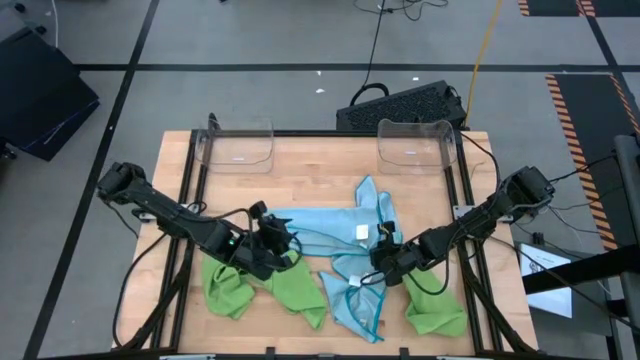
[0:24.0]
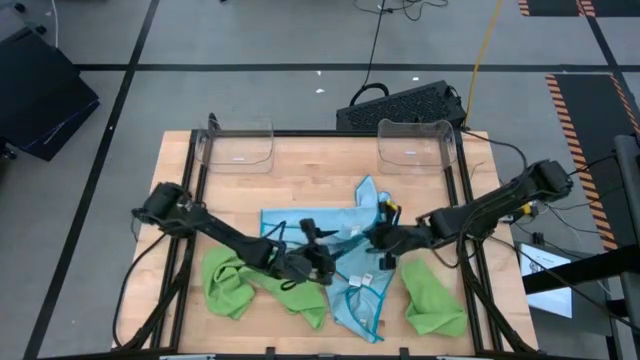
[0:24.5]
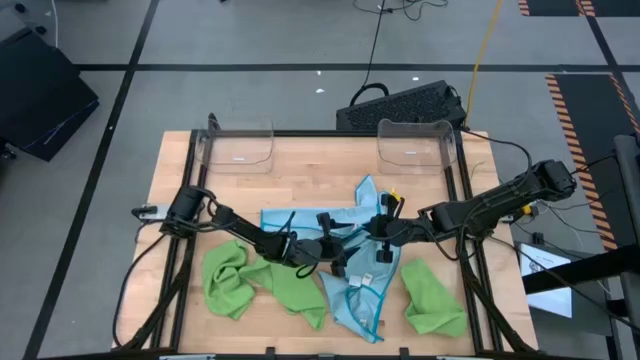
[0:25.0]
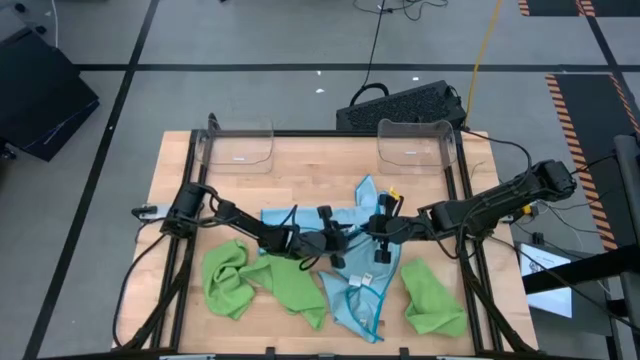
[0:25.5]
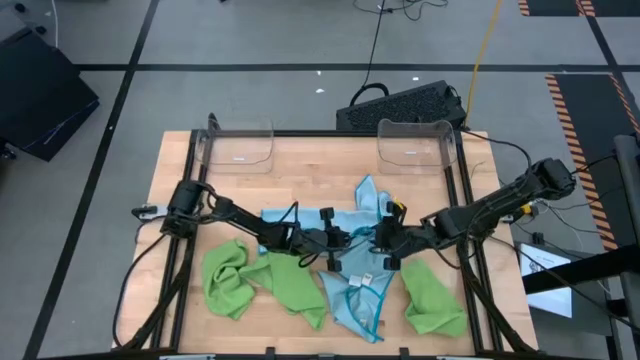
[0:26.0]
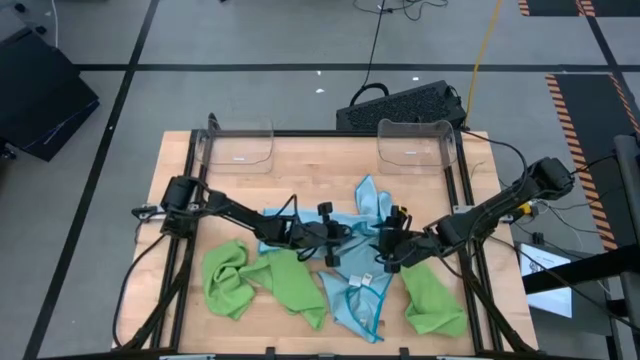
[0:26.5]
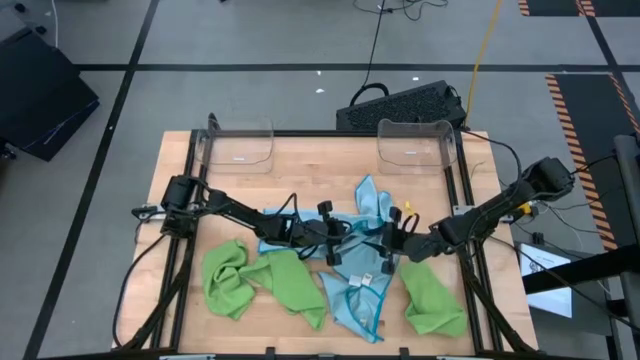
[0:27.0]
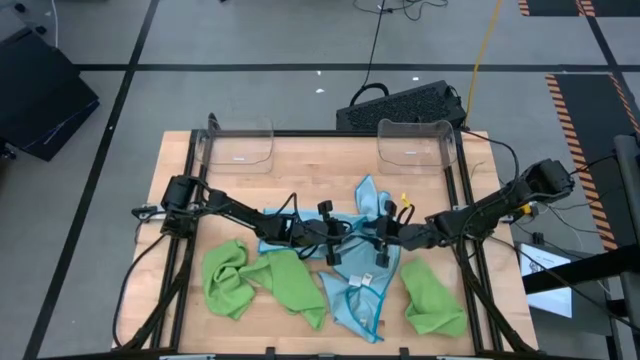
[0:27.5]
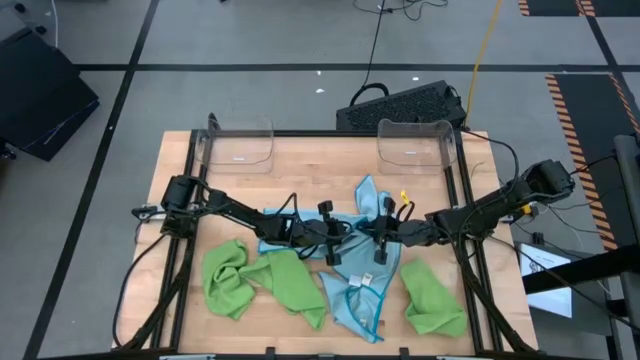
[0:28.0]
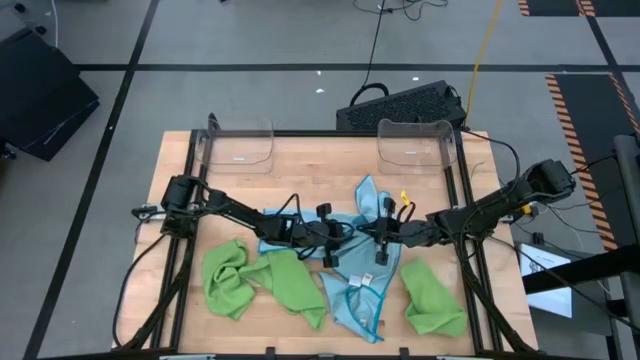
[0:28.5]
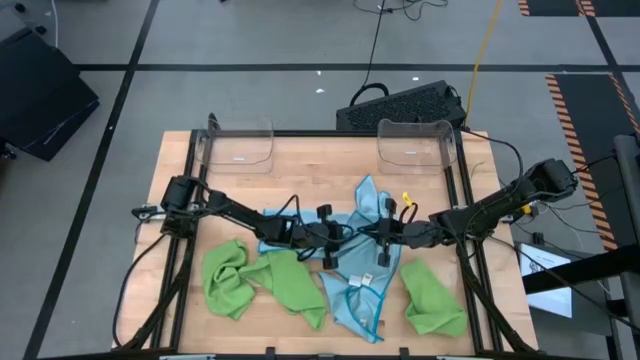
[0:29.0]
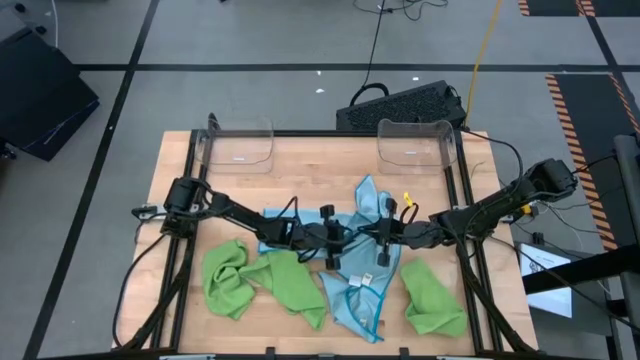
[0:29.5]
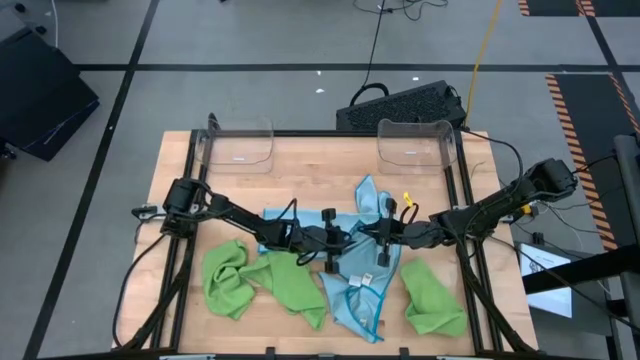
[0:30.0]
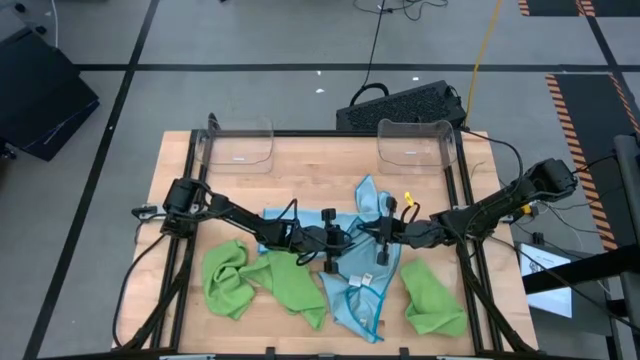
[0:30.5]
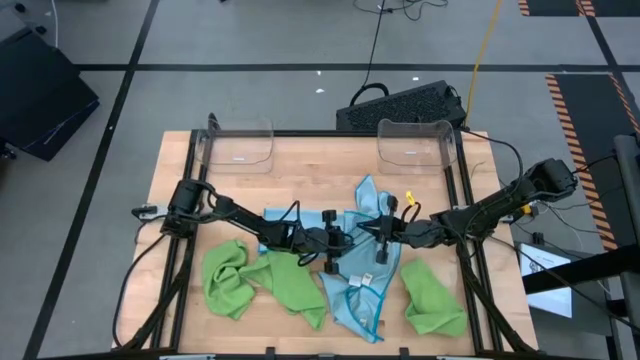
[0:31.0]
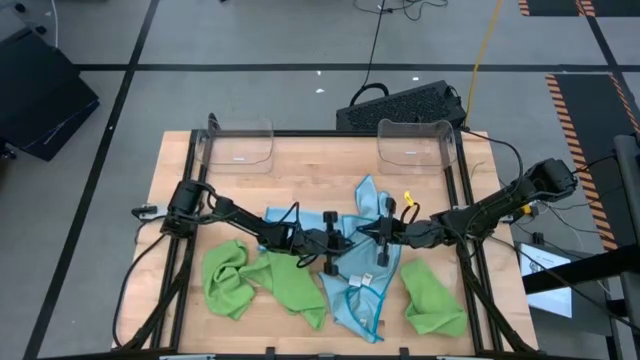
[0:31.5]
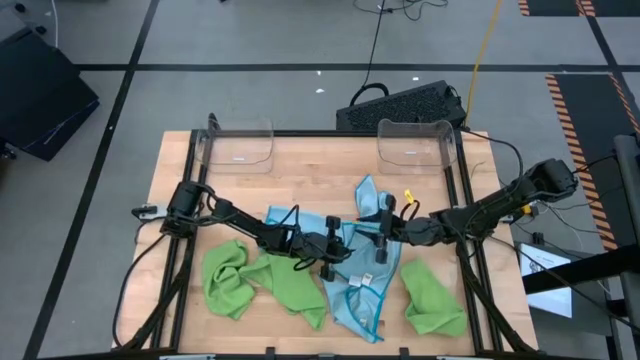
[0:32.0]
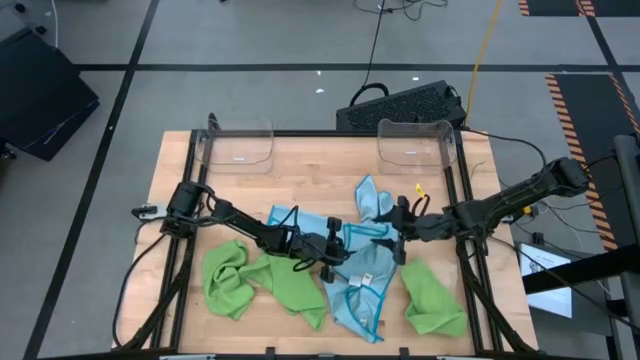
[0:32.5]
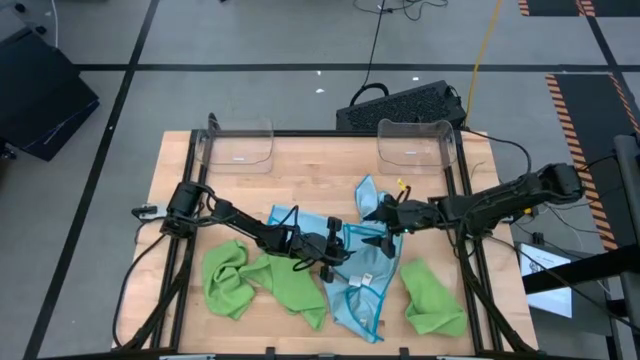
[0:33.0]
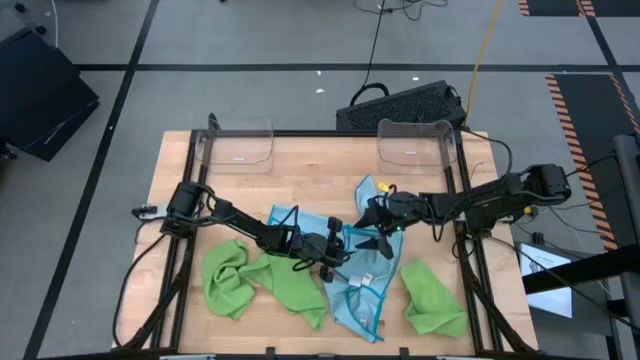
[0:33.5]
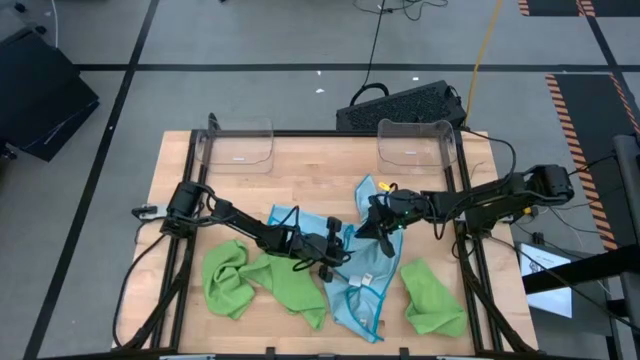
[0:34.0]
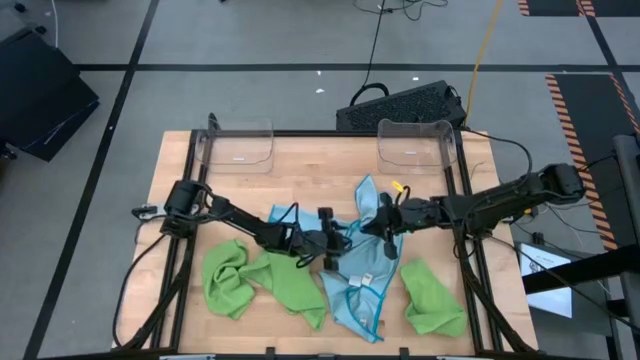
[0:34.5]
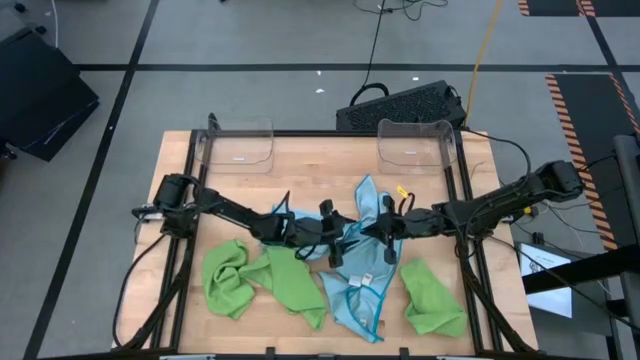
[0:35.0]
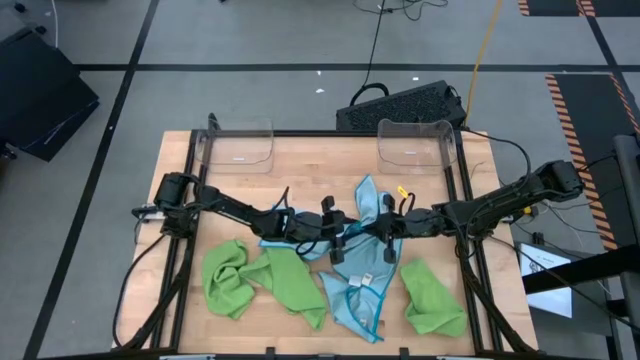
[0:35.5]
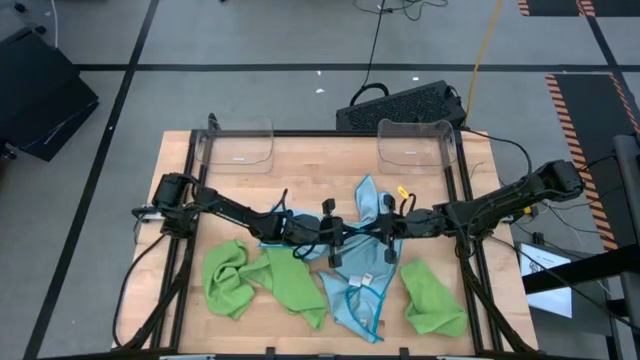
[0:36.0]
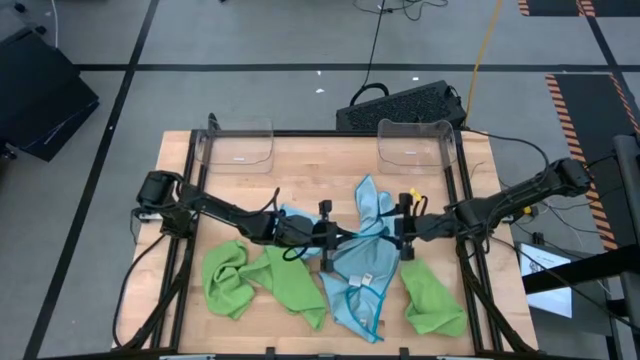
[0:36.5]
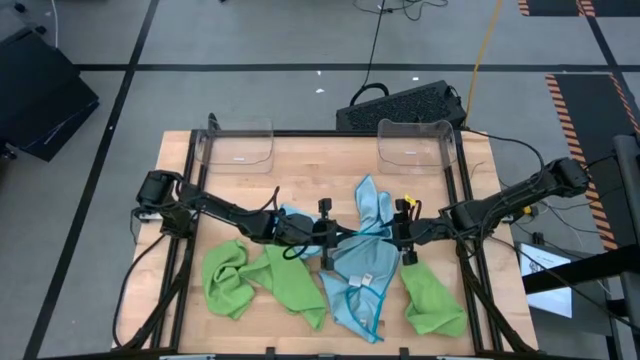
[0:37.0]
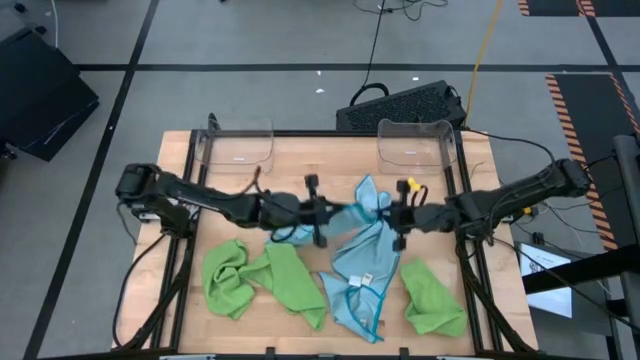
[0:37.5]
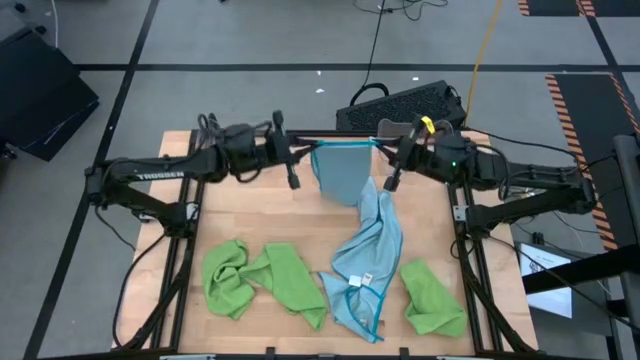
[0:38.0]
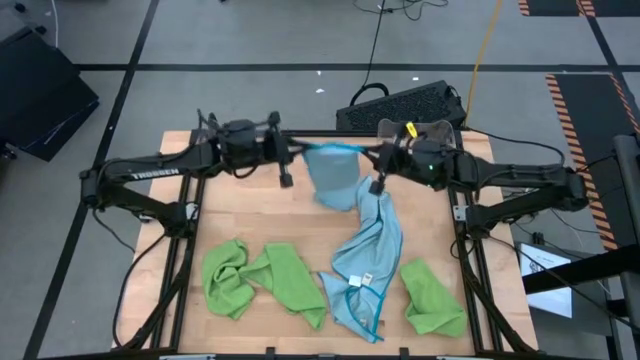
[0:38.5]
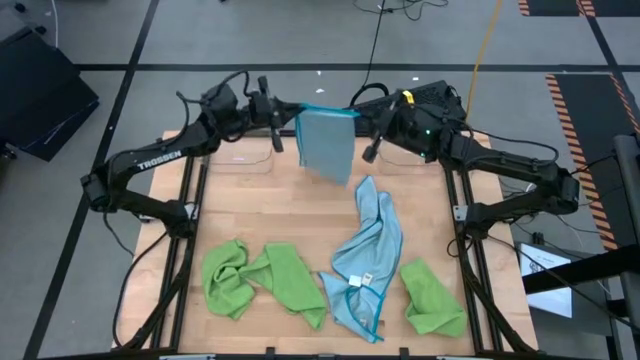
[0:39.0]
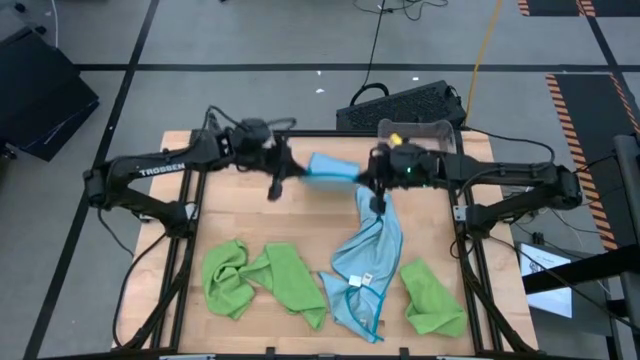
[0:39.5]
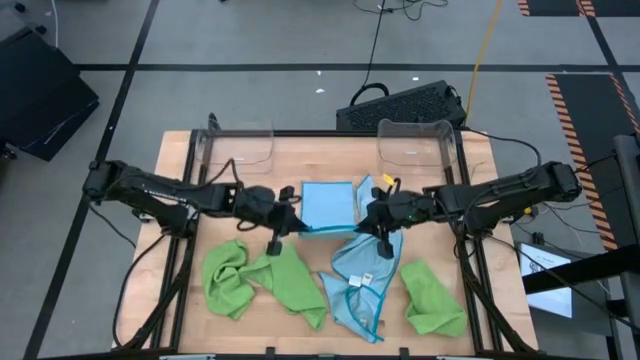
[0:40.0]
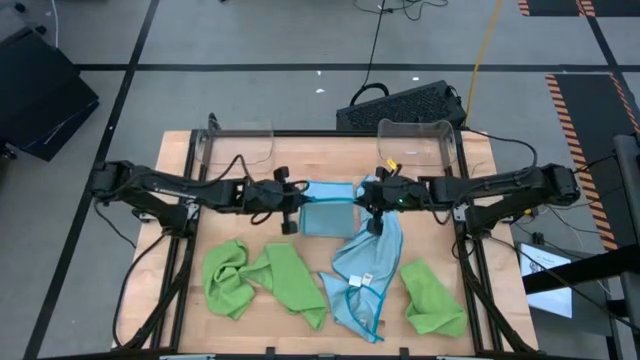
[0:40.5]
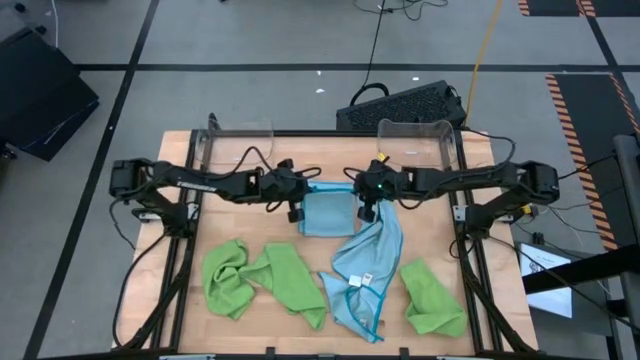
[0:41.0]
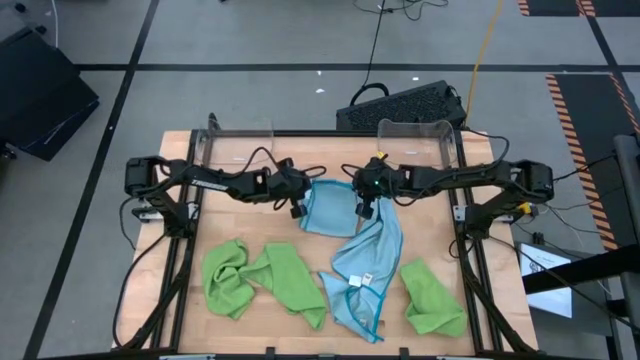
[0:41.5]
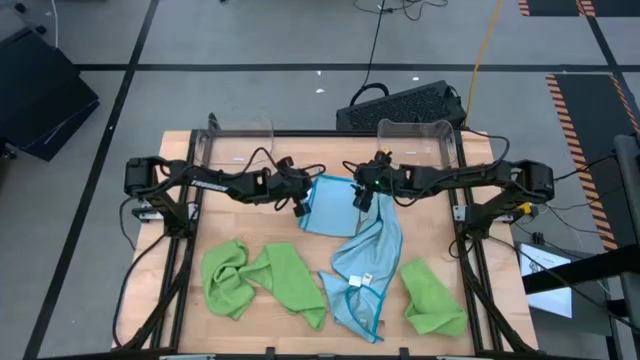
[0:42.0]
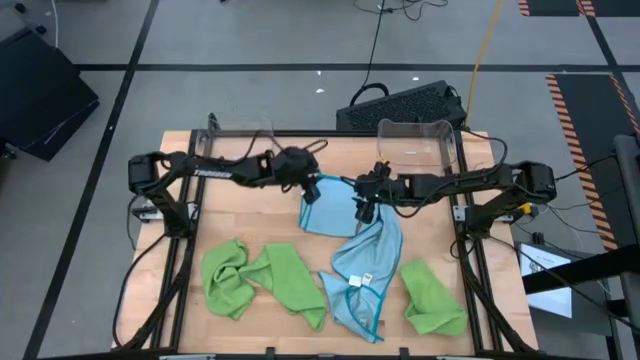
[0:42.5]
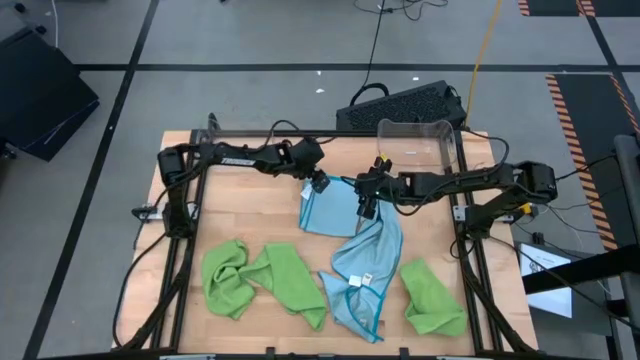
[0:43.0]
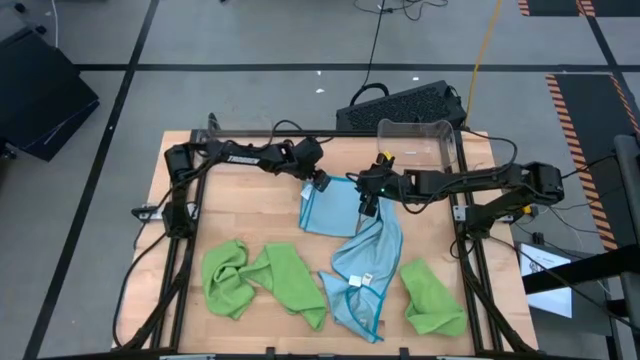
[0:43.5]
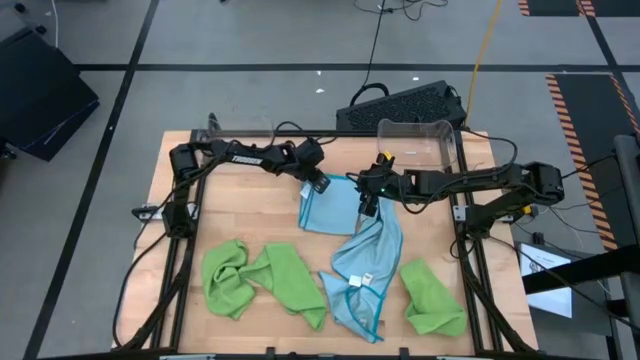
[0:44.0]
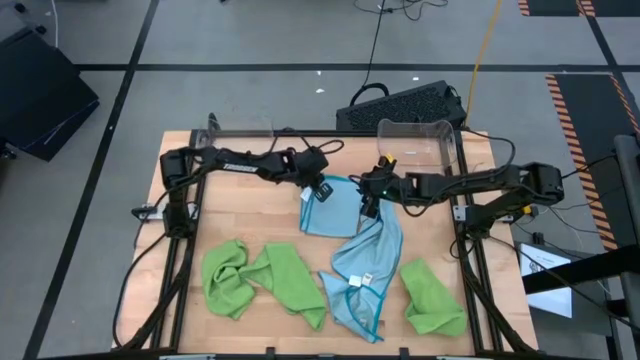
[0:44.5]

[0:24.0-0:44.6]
Task: Fold microfiber towels
Fold the top left blue microfiber cloth

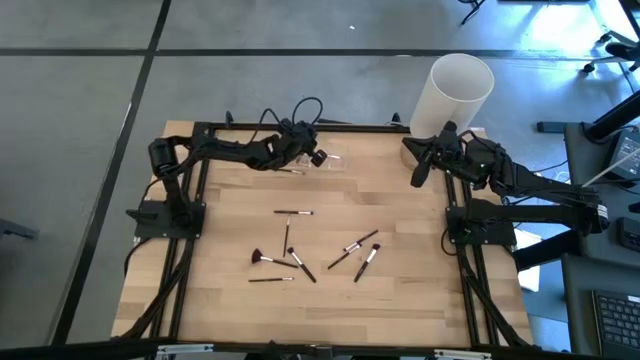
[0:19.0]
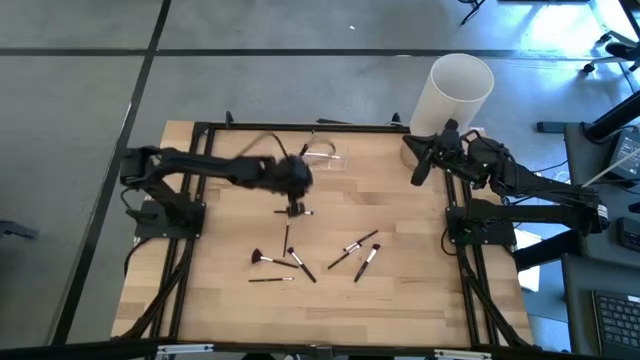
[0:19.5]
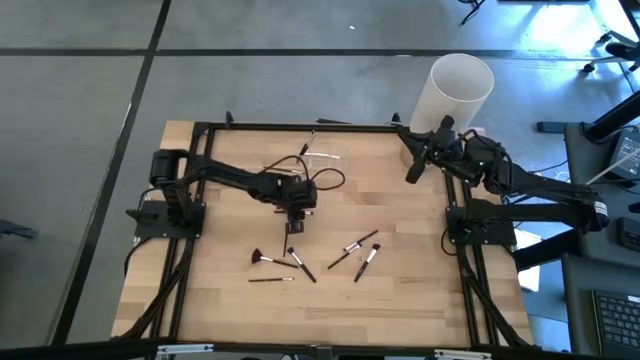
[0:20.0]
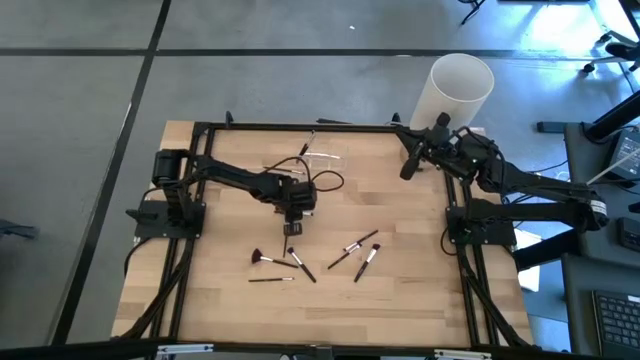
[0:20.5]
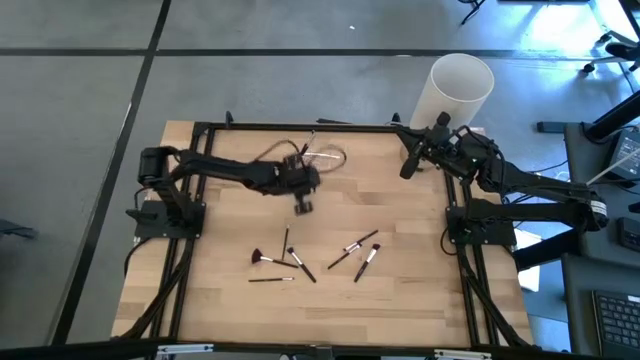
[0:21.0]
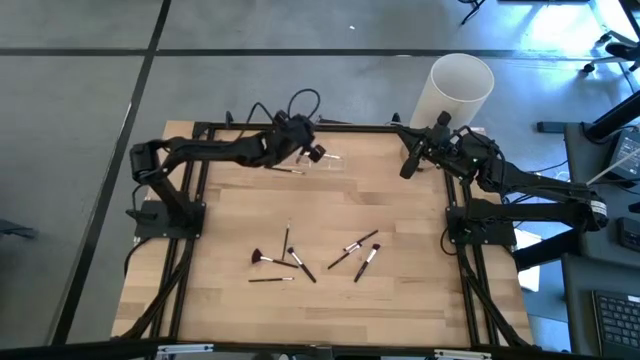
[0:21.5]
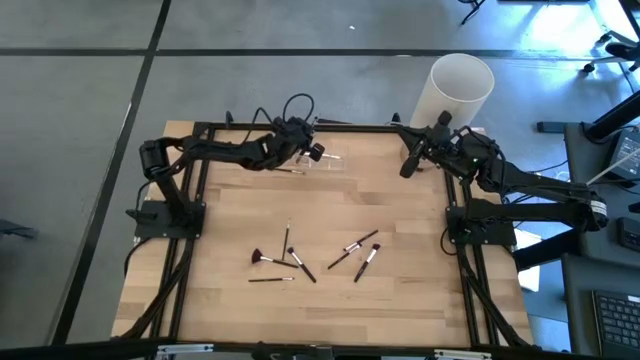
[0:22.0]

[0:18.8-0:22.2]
Task: Pick & Place Makeup Brushes
Put the eyeshadow brush into the transparent organizer
